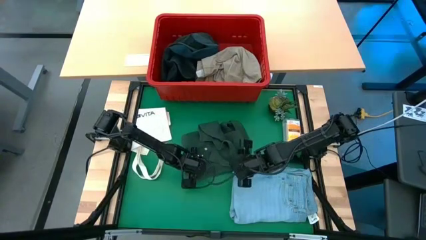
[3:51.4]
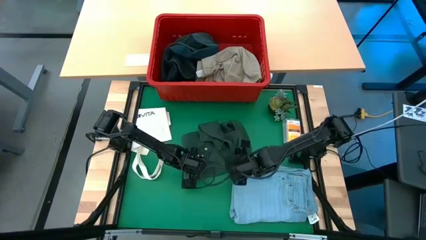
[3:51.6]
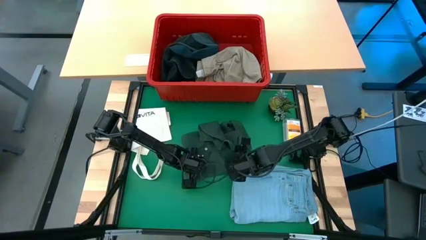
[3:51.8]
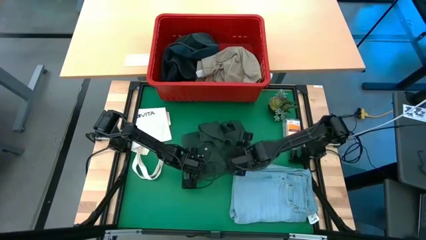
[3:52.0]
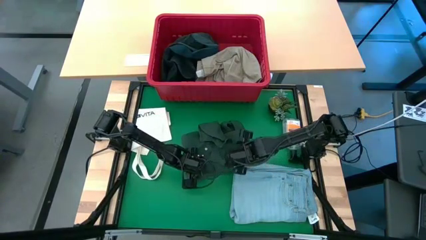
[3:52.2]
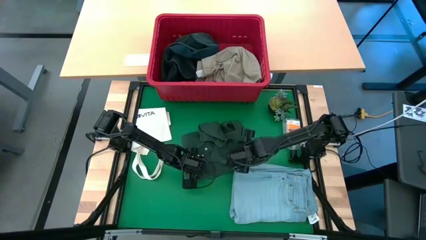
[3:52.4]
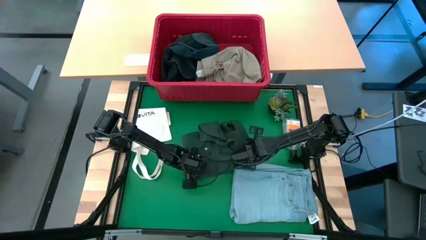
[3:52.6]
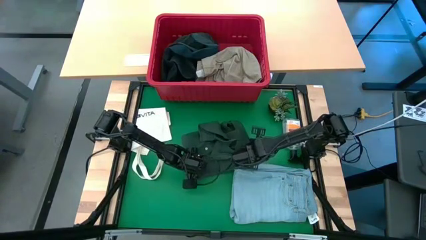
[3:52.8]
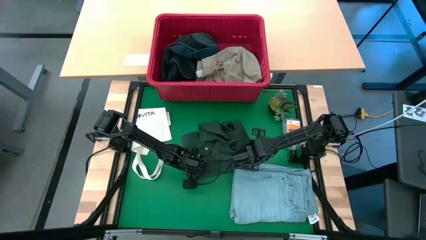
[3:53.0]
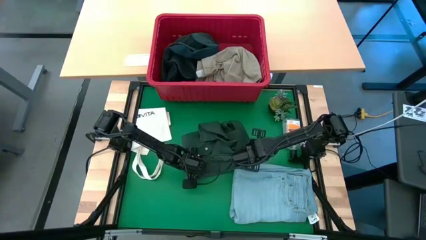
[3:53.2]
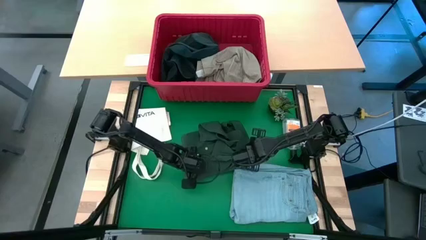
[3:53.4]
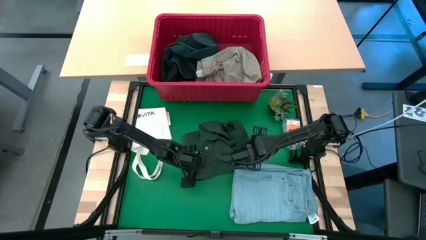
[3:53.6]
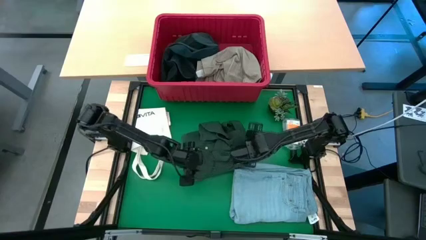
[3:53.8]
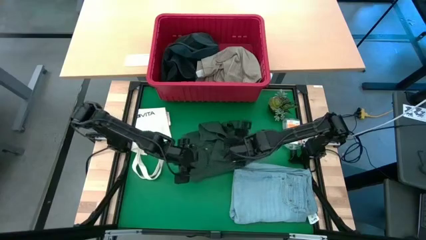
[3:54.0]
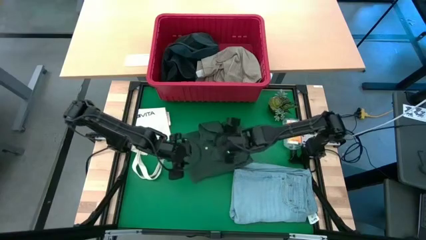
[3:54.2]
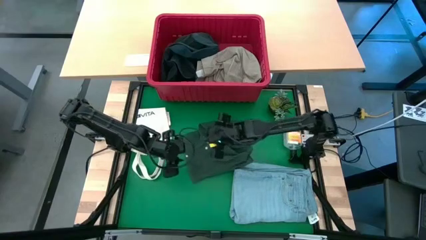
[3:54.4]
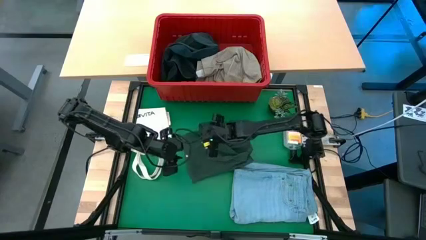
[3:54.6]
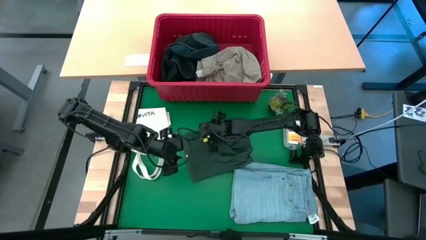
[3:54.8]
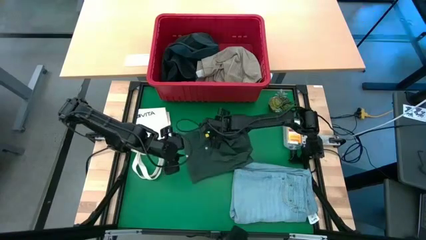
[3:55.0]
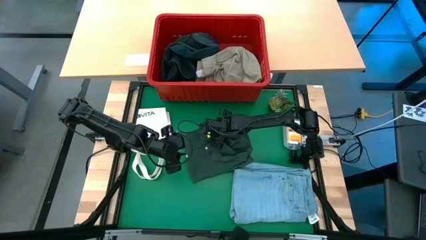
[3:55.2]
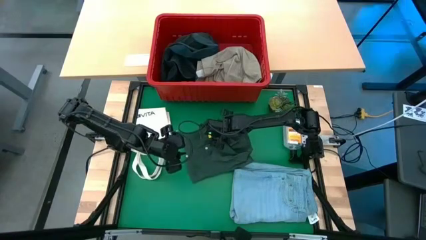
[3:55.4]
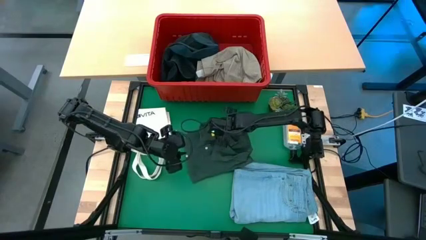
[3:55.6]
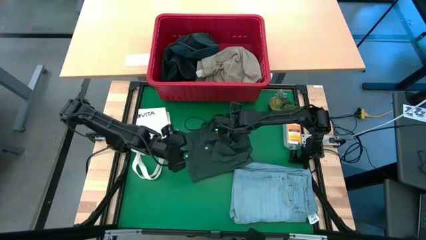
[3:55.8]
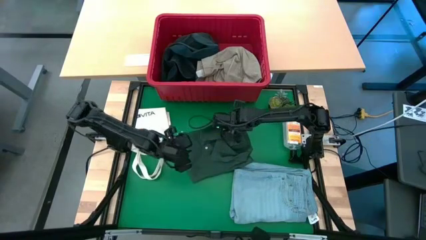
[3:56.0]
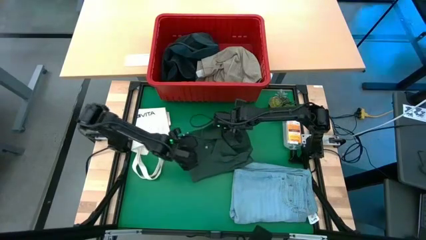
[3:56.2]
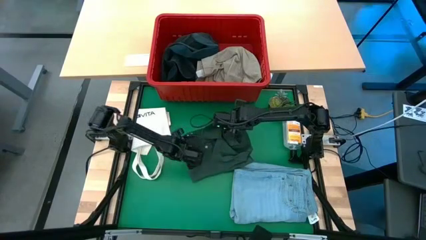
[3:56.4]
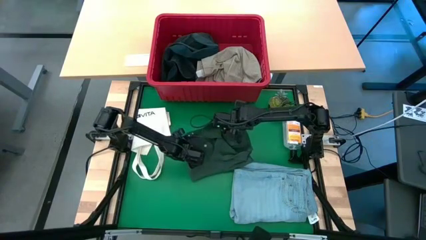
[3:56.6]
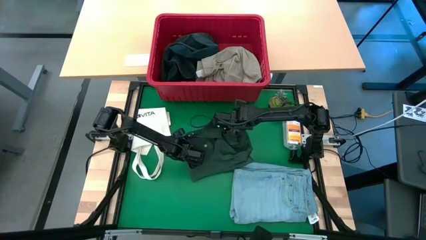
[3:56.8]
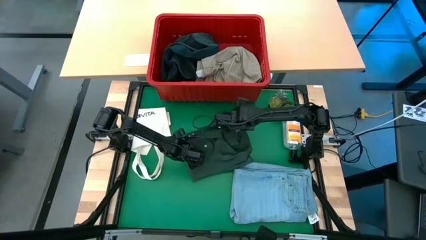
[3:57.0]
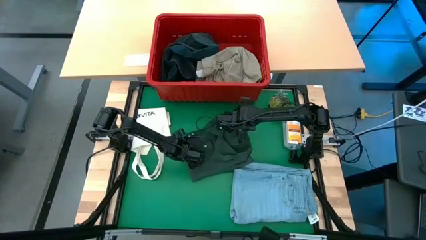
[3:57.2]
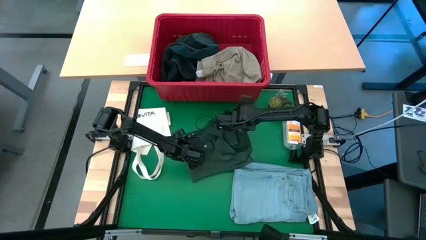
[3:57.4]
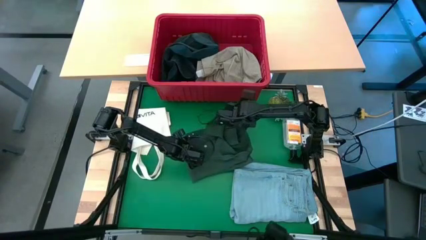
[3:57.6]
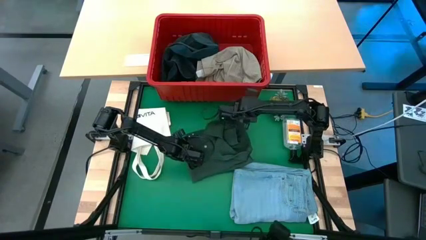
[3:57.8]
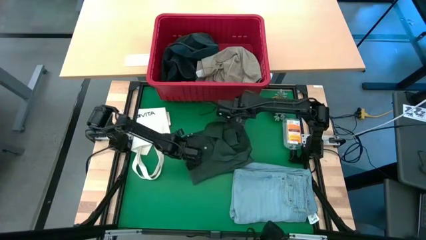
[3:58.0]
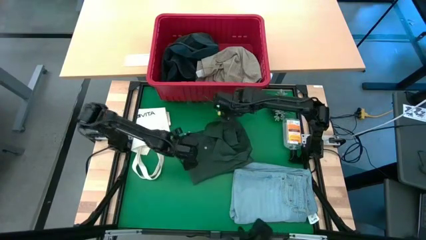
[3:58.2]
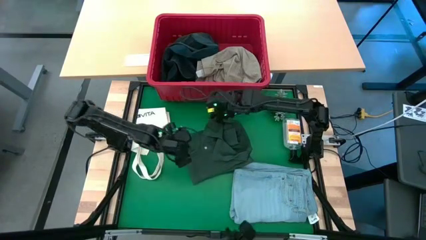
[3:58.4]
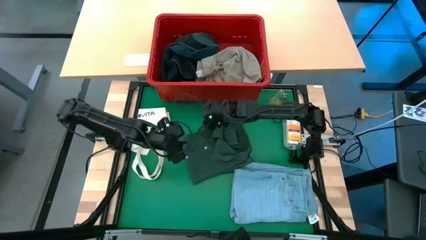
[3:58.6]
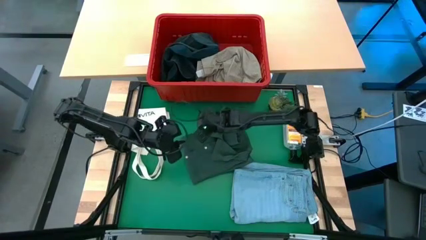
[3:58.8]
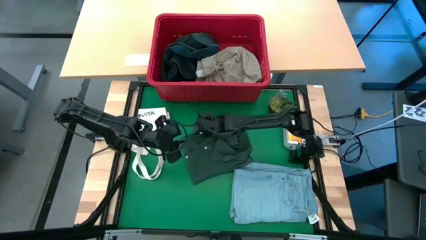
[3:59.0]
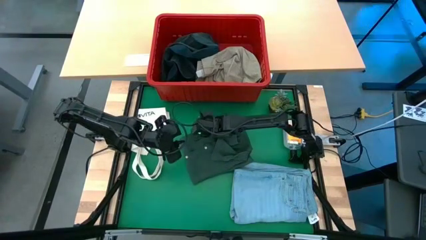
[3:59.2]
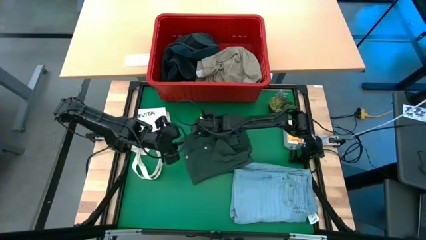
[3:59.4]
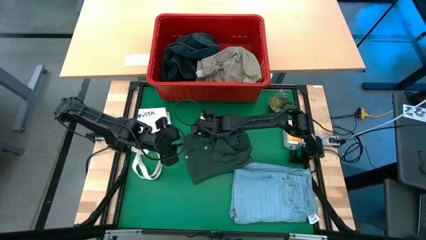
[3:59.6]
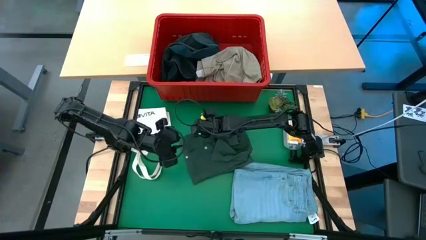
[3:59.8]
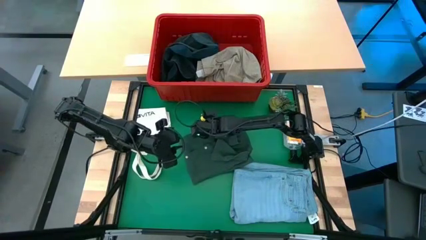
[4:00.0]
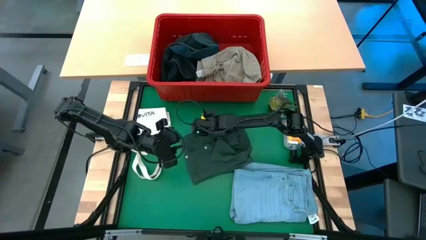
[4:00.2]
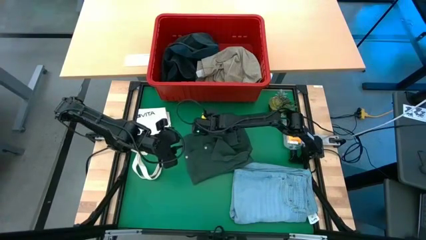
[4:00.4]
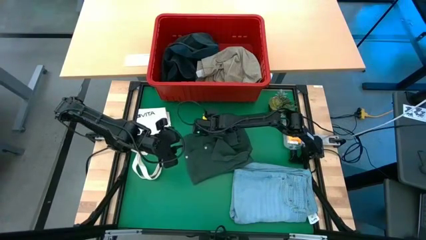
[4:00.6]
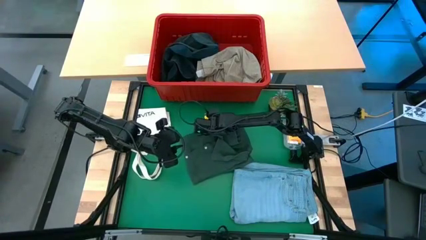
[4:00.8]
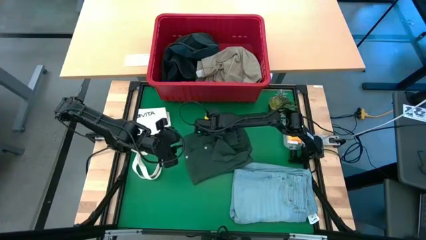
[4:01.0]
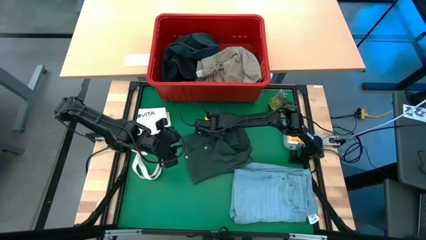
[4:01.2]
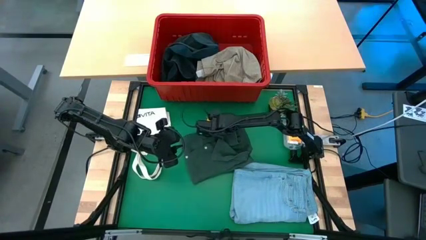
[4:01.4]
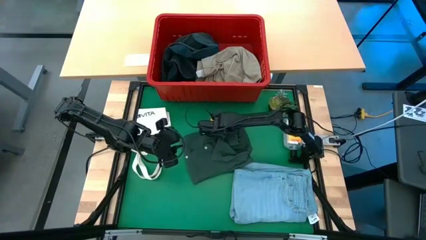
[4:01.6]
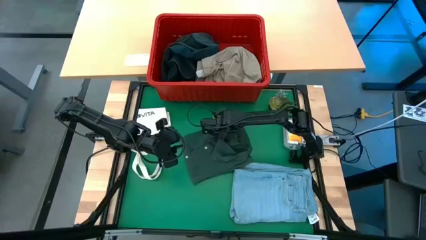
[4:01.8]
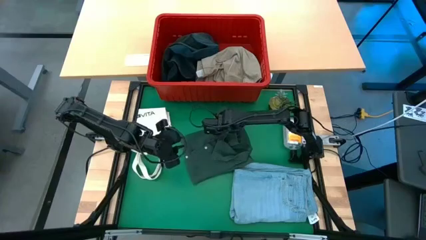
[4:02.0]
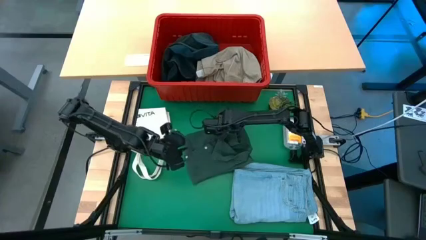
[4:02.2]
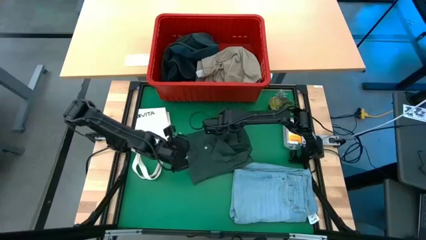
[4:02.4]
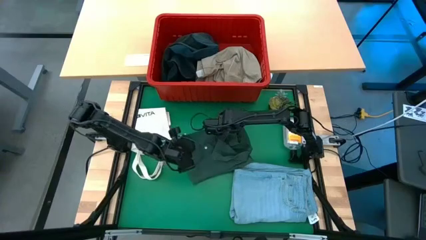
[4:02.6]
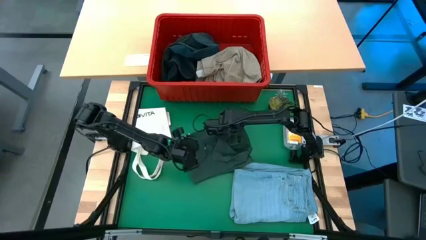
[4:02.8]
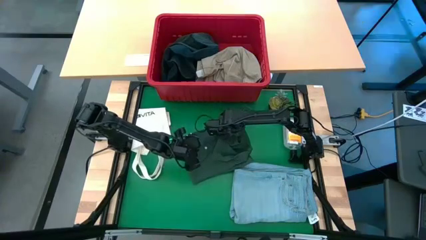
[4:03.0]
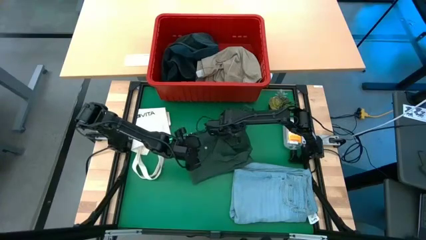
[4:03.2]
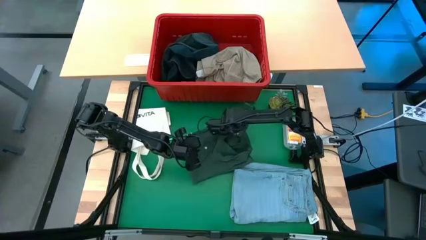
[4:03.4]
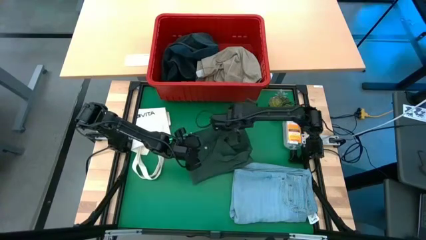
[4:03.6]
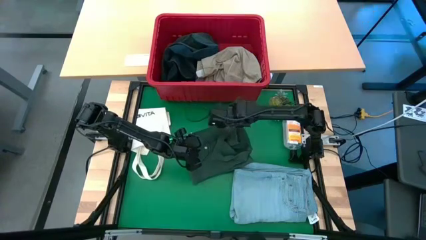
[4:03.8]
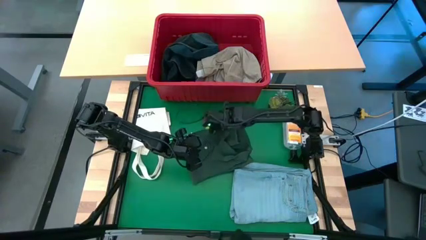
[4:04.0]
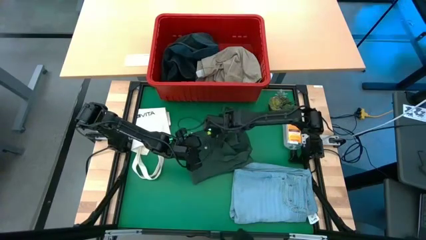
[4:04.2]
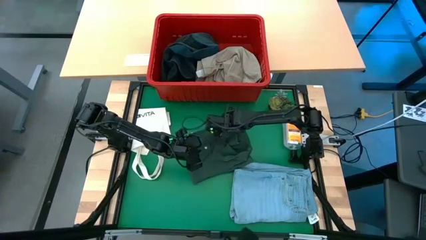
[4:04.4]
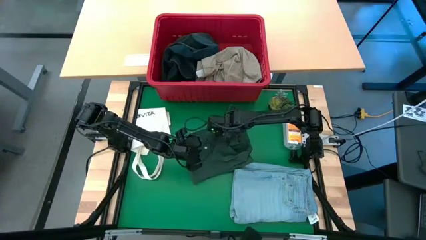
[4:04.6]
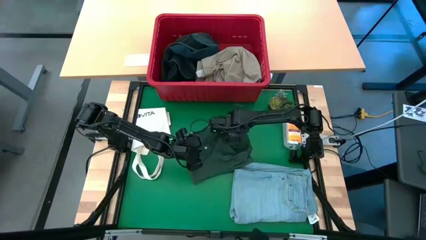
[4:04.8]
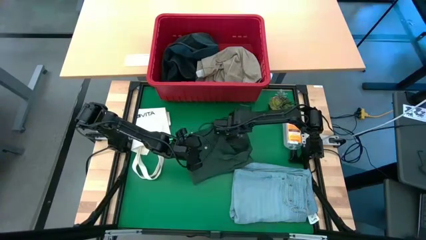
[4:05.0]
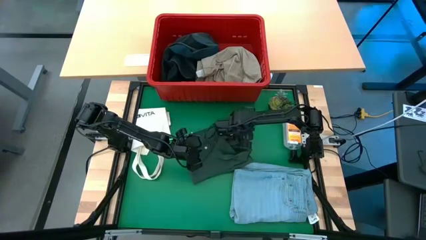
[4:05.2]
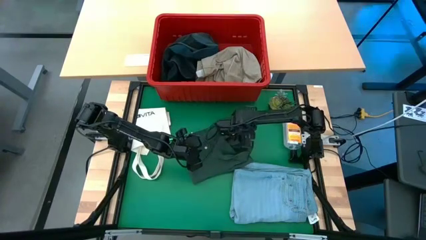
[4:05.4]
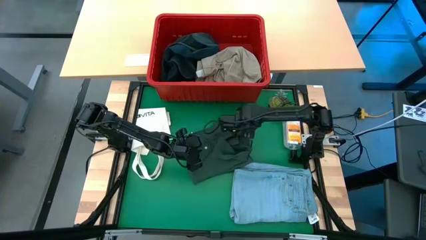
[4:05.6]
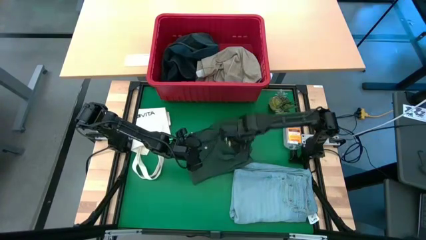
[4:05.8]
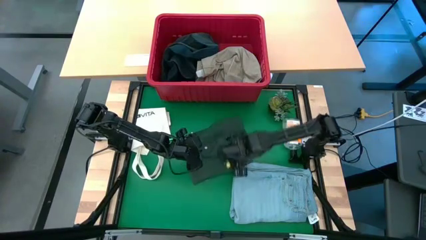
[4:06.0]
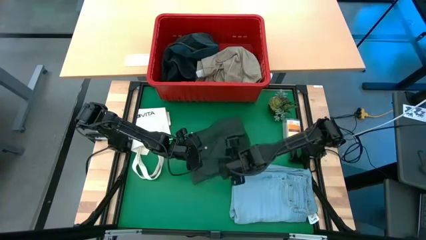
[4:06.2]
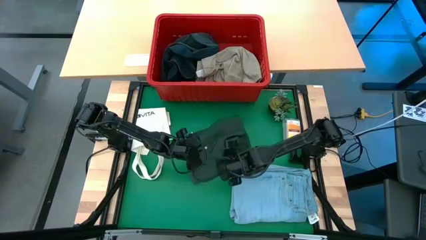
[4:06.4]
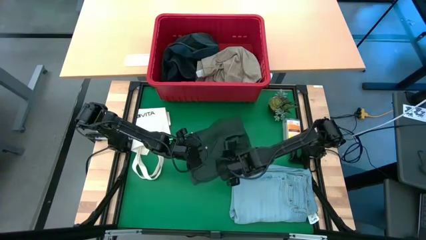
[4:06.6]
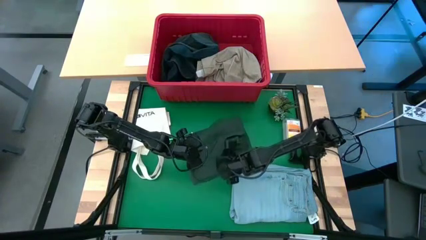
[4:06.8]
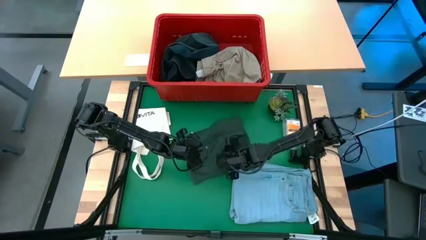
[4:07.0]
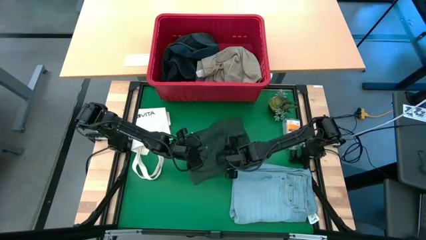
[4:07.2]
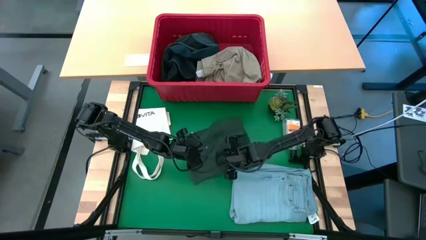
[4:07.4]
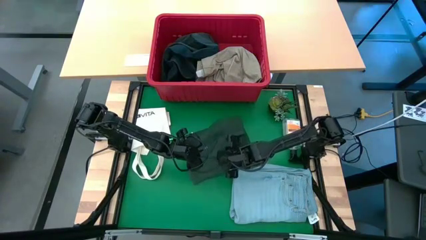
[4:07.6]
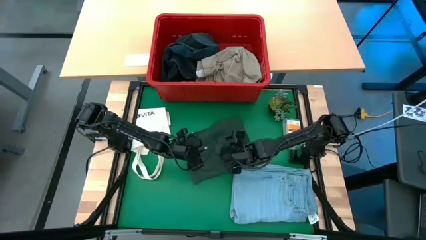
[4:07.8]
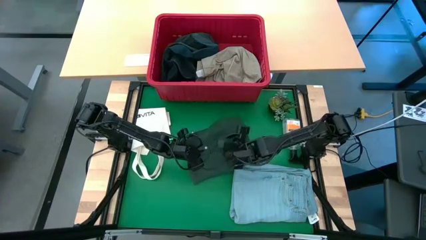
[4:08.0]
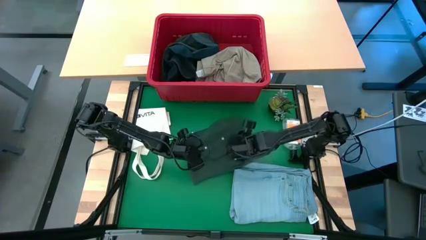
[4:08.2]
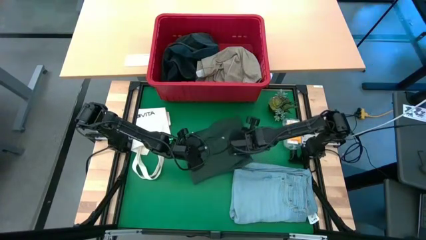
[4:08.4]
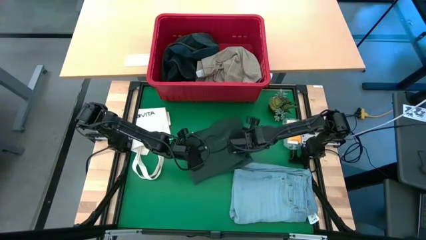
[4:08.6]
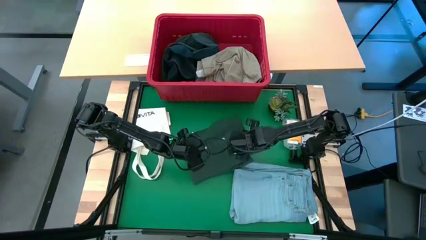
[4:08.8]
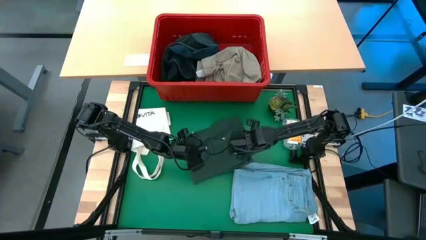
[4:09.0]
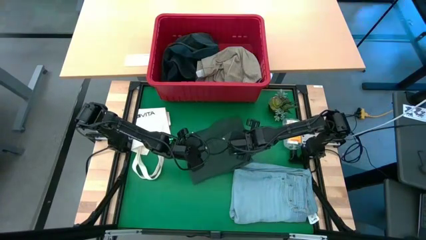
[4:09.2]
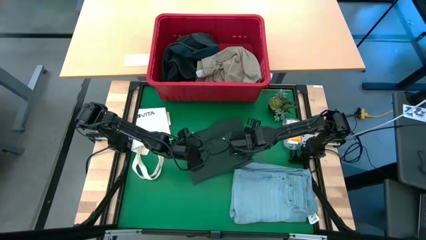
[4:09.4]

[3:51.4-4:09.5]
Task: Fold Laundry from Bin
Fold the green shirt
